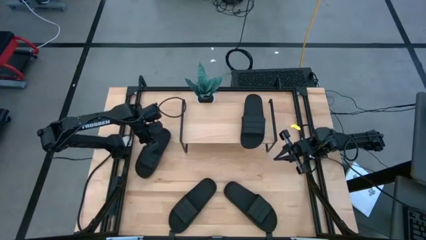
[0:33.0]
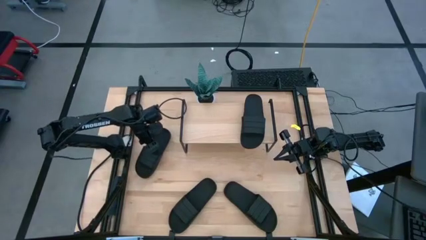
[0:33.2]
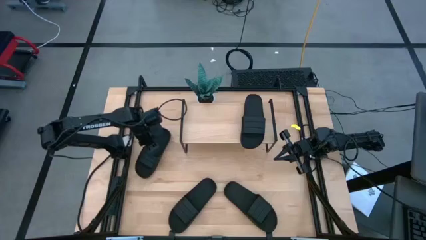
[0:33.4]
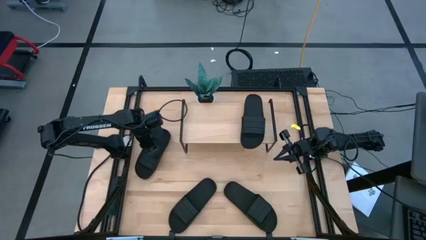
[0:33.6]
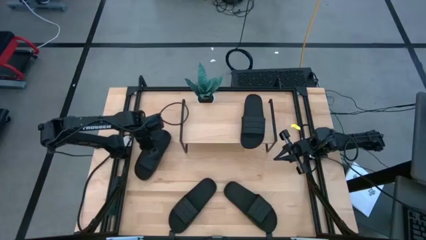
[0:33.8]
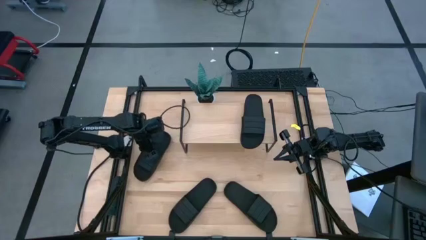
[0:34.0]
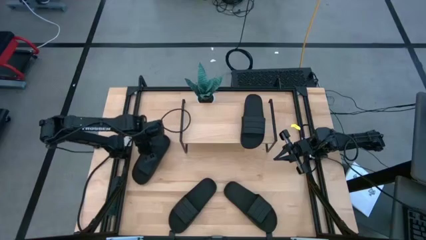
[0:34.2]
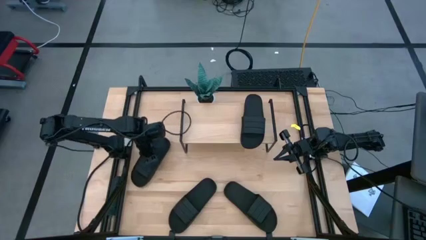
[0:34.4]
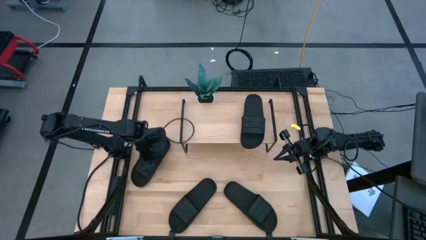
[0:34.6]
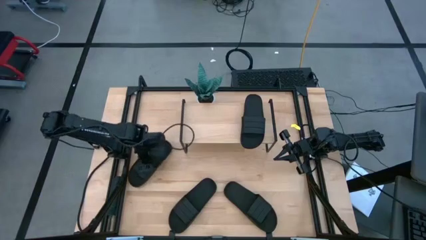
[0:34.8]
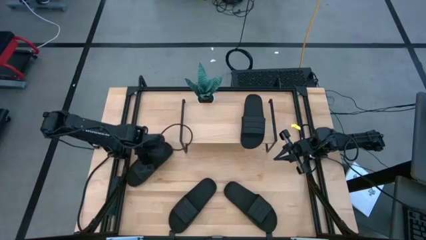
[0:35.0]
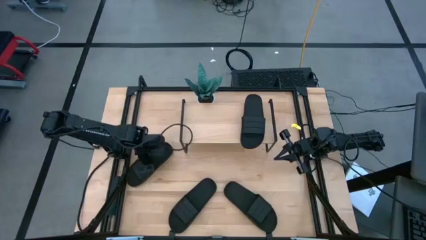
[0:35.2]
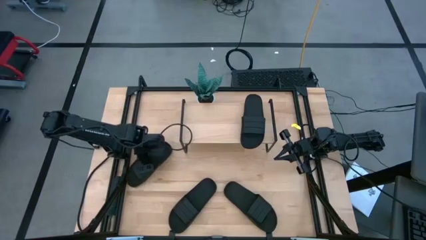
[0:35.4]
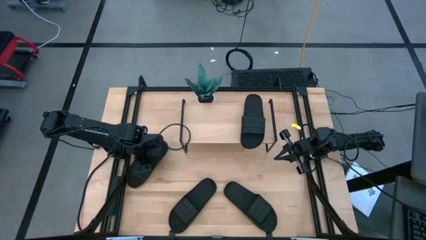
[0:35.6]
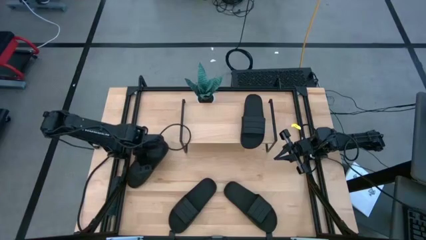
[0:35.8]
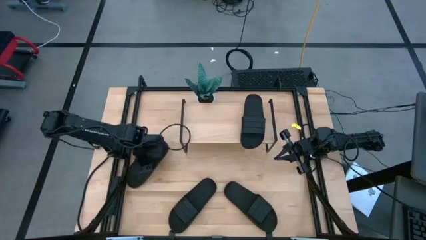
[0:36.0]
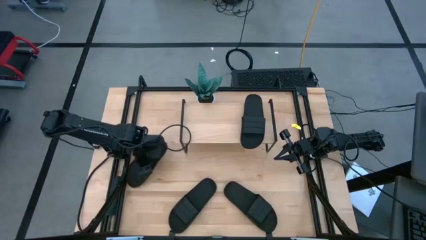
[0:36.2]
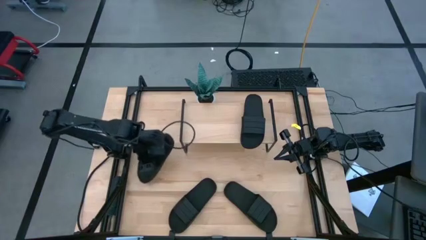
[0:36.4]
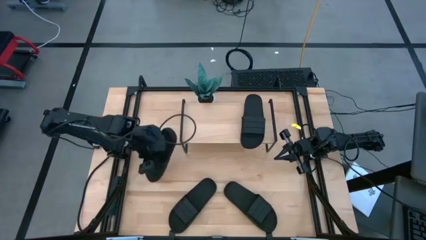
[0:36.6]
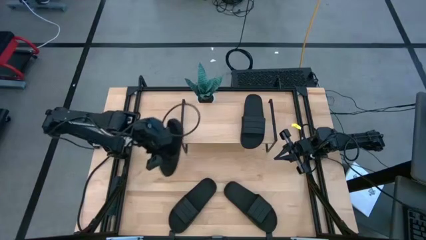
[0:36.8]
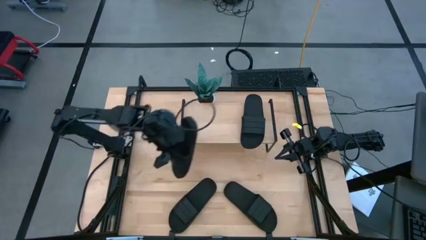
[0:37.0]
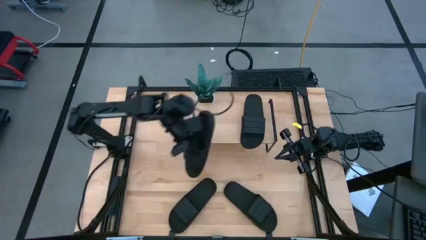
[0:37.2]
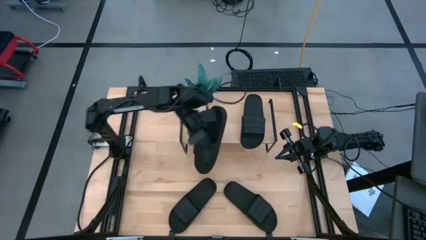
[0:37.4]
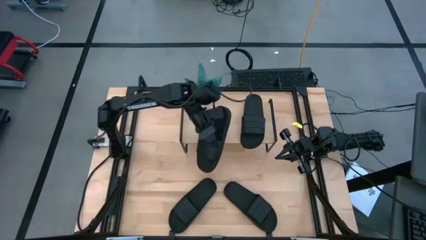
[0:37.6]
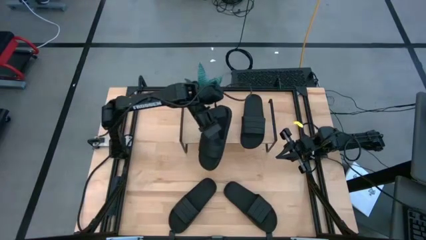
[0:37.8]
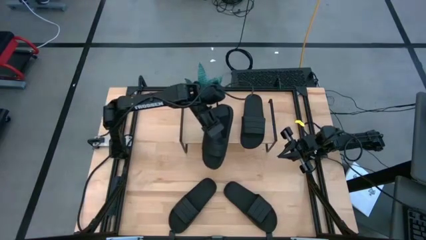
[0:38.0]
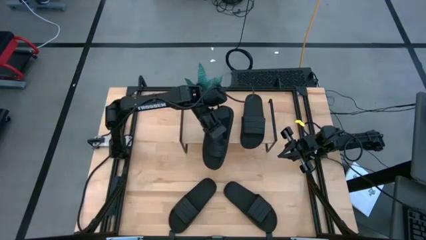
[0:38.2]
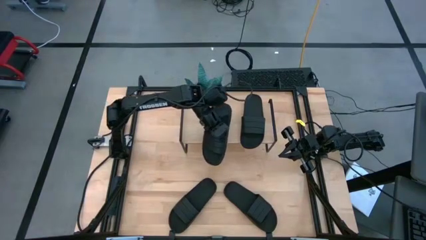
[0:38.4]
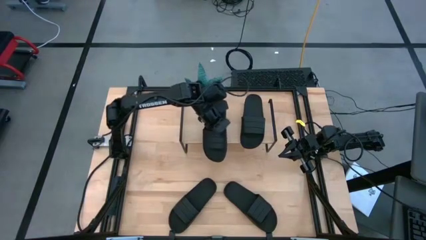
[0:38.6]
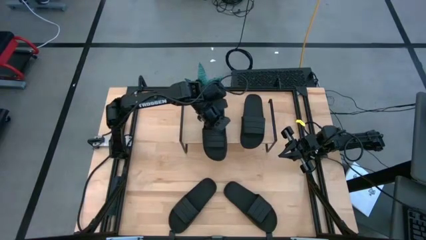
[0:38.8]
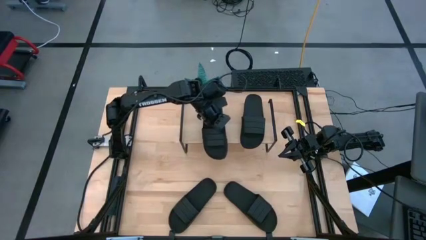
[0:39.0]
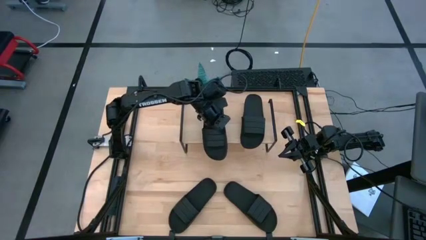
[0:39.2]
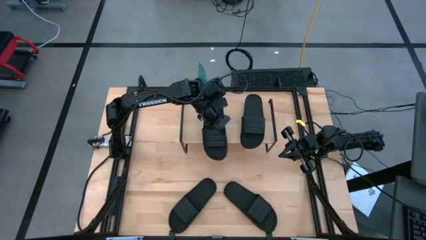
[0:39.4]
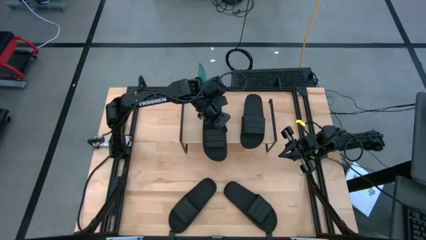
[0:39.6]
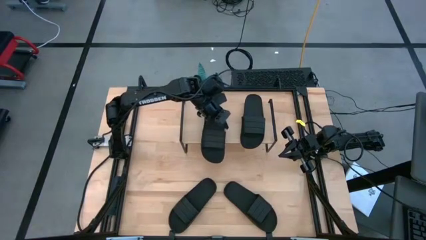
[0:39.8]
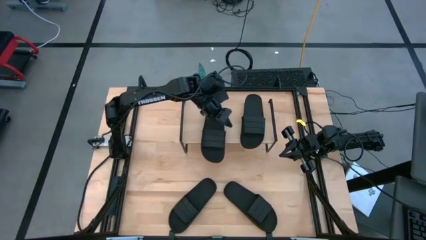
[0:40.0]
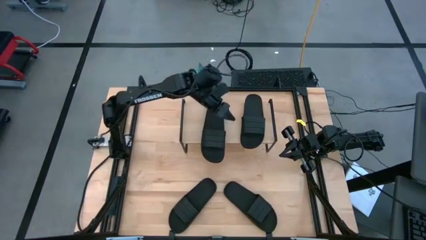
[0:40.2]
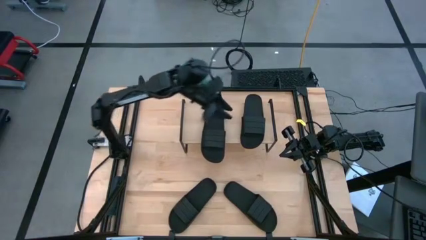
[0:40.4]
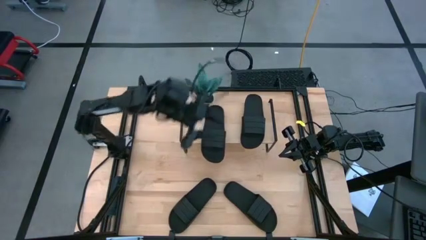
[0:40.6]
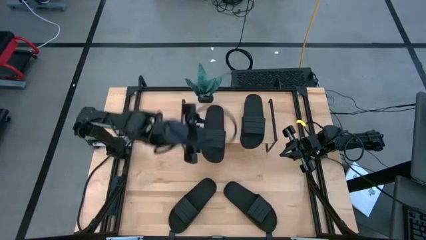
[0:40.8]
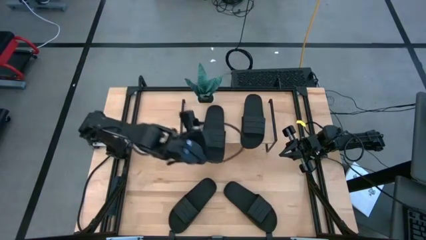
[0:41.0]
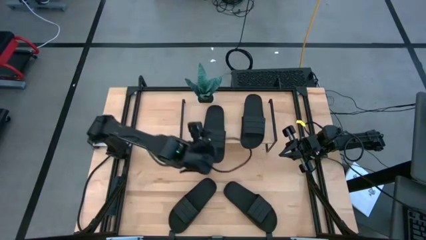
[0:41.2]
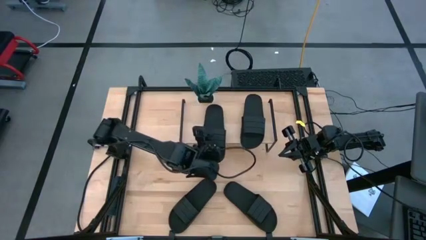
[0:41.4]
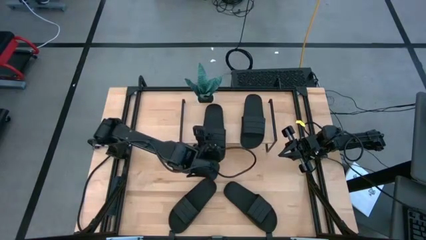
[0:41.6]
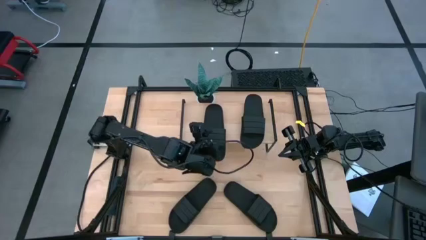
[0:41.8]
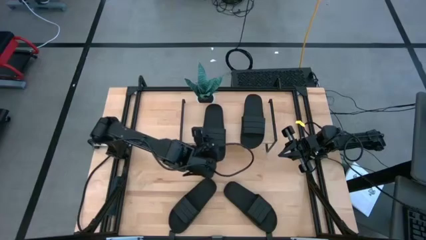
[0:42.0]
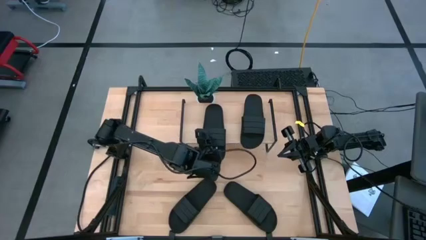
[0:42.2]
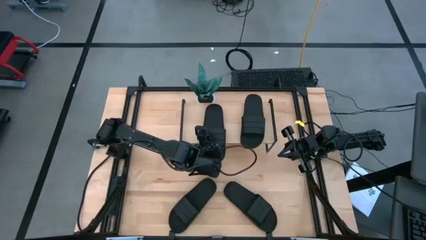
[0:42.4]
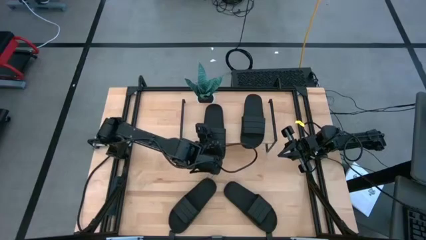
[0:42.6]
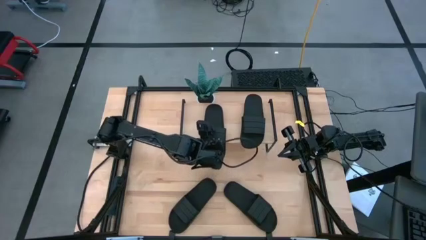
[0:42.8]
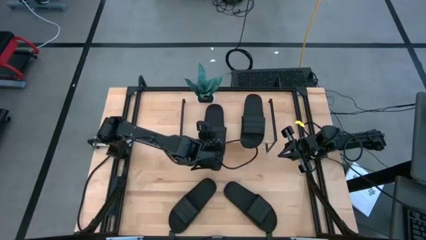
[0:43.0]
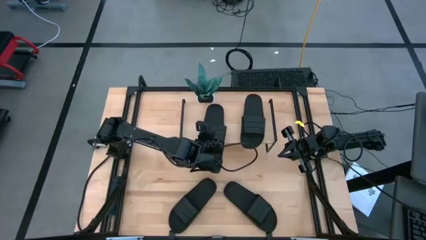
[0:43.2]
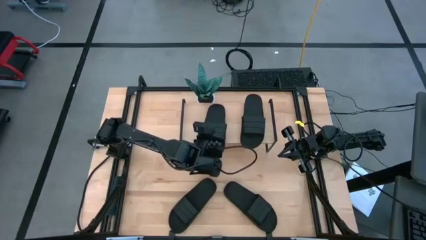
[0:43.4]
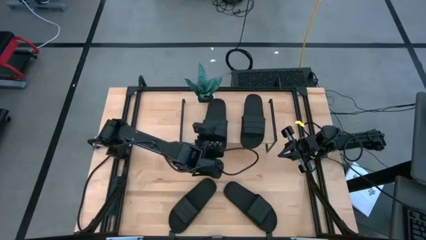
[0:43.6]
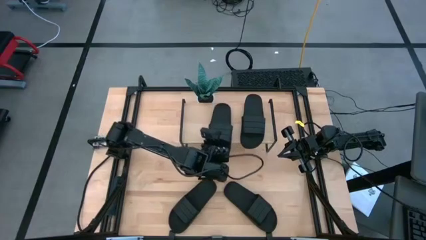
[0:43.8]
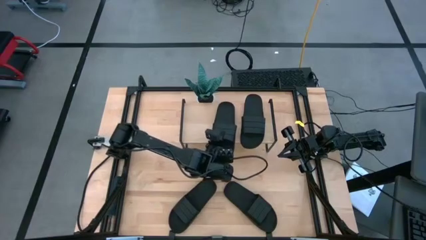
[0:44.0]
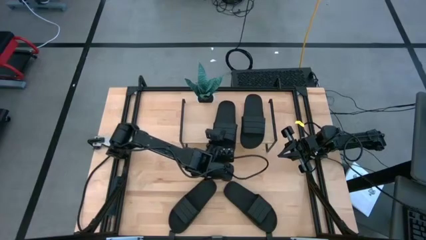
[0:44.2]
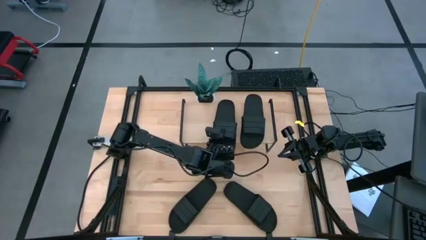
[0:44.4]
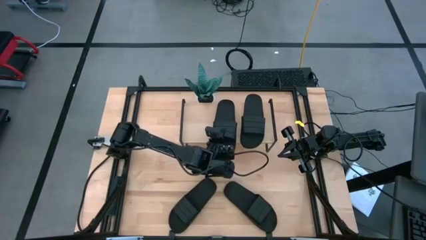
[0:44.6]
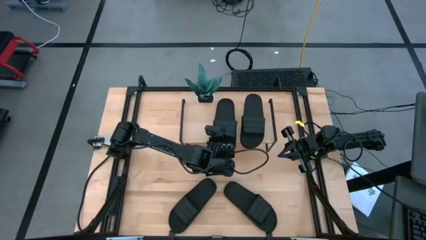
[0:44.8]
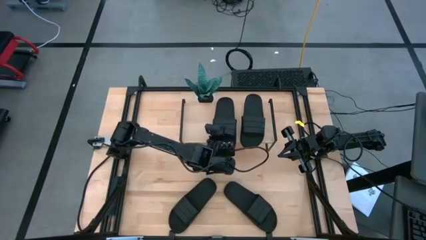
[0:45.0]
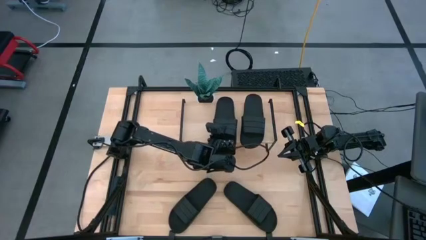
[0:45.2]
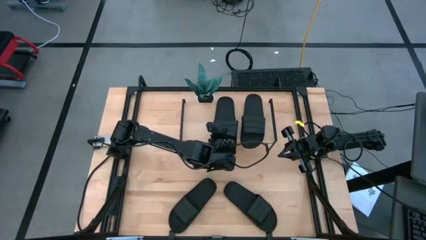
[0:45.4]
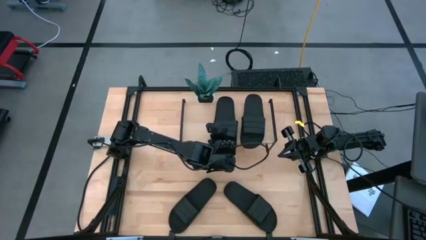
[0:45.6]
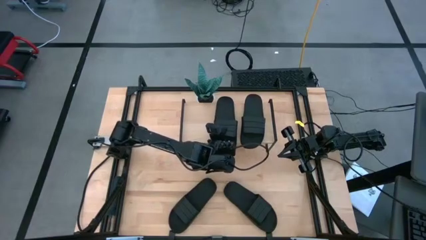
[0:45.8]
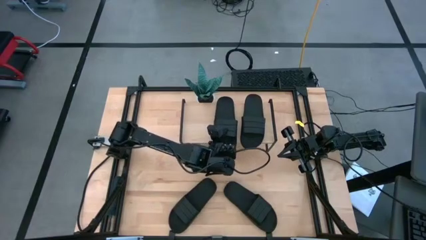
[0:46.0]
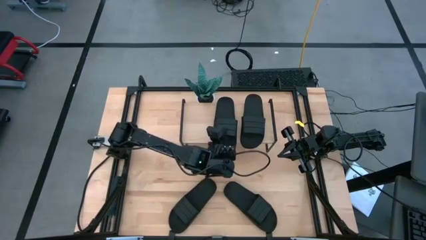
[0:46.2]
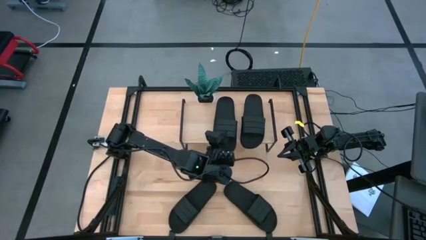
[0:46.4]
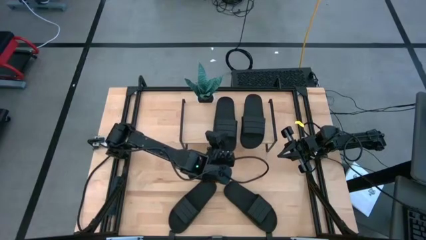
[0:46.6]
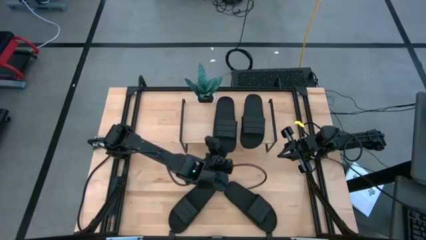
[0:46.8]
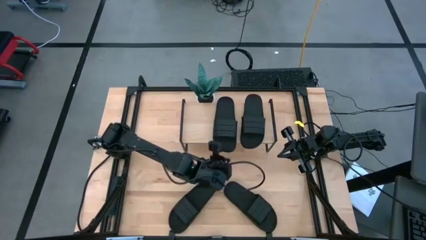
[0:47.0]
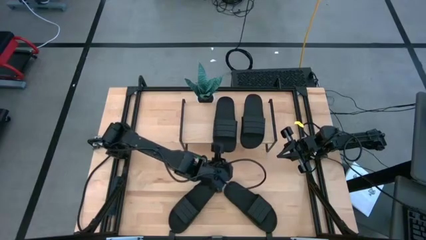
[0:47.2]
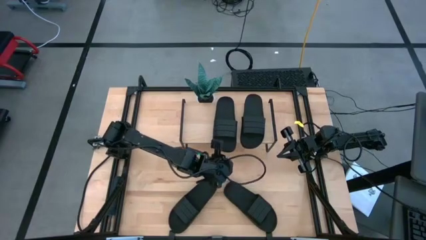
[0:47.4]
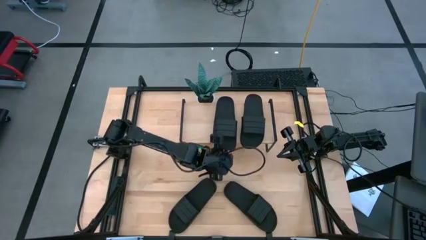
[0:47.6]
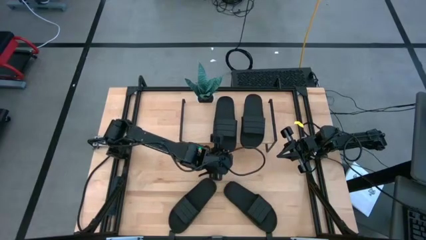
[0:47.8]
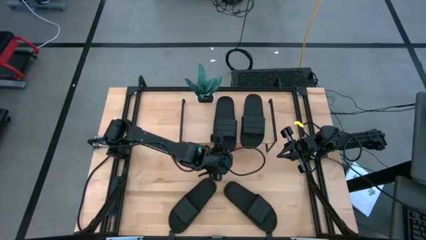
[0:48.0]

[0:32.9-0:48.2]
Task: Pick and place slides into the shelf
Put the top black slide on the shelf
